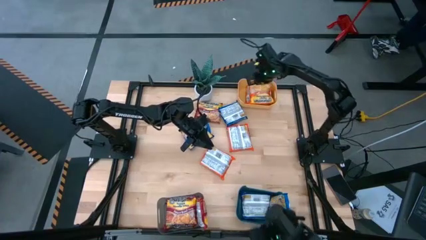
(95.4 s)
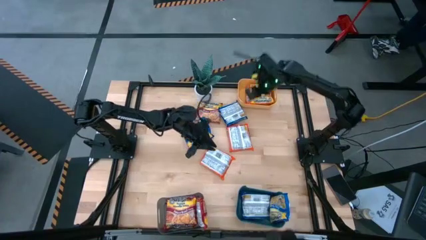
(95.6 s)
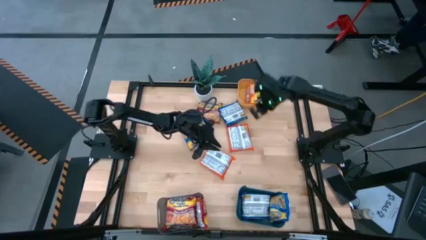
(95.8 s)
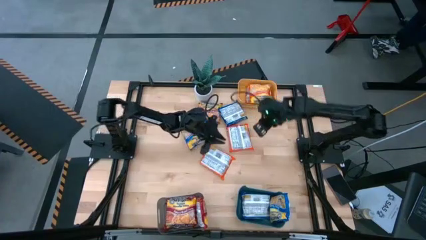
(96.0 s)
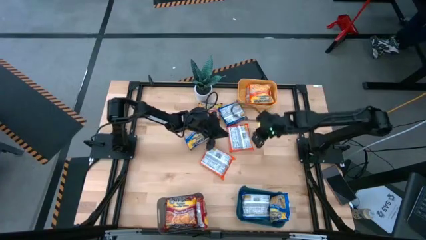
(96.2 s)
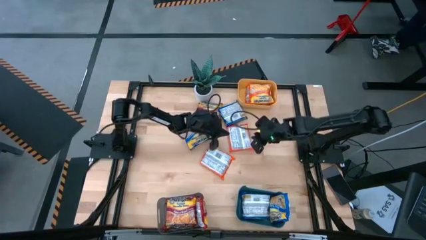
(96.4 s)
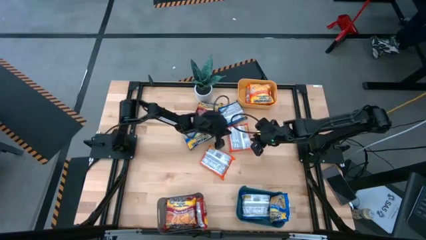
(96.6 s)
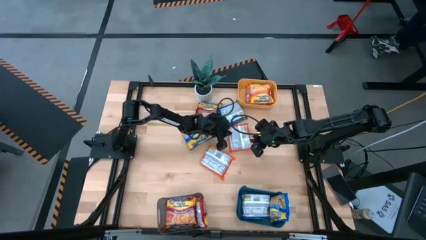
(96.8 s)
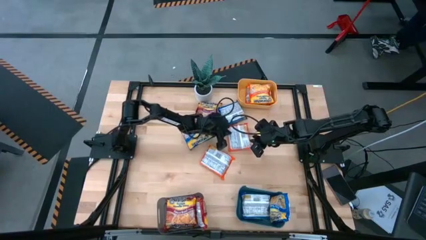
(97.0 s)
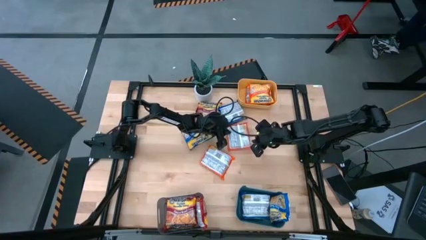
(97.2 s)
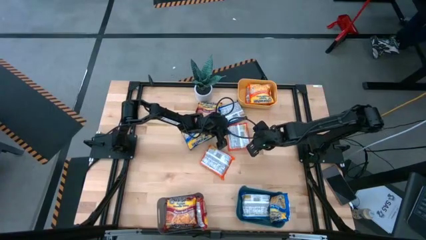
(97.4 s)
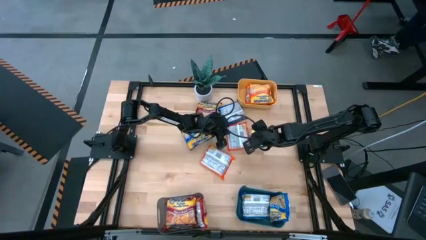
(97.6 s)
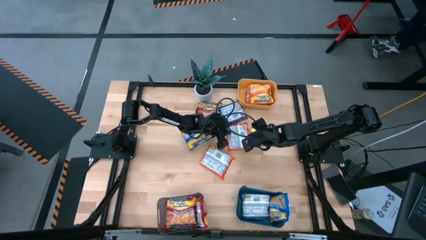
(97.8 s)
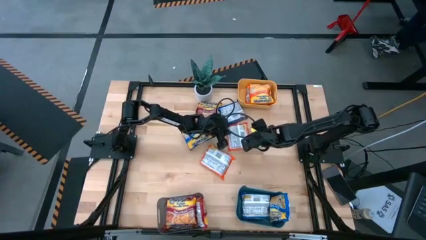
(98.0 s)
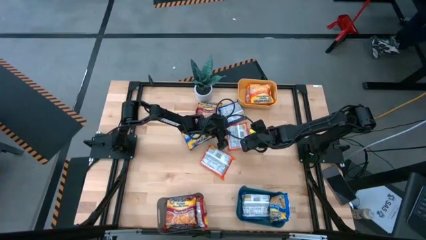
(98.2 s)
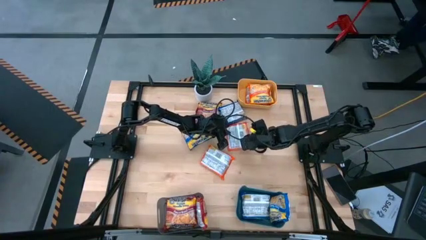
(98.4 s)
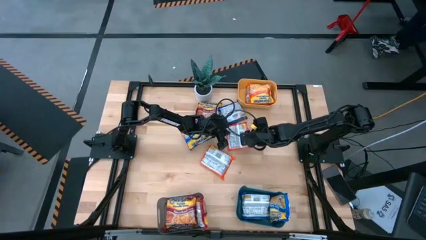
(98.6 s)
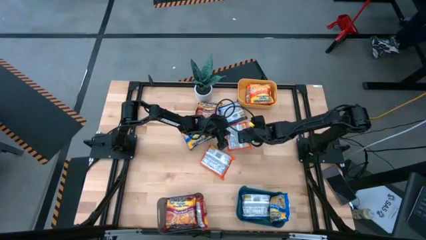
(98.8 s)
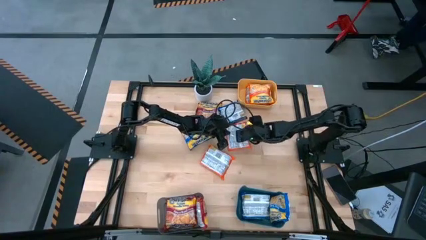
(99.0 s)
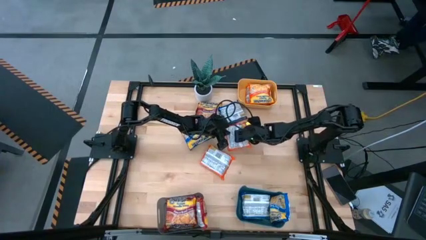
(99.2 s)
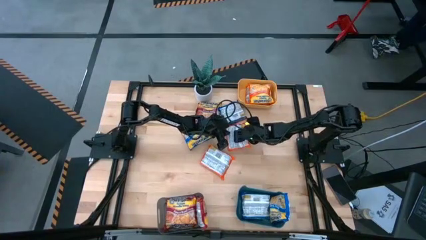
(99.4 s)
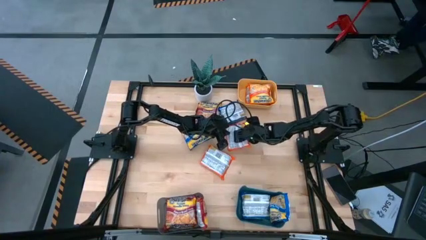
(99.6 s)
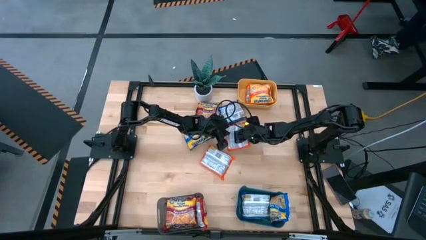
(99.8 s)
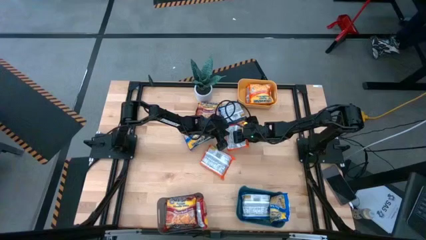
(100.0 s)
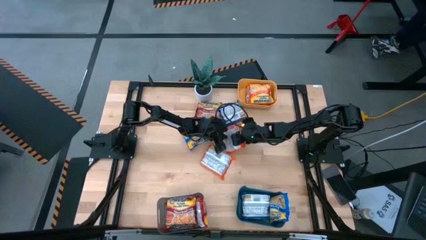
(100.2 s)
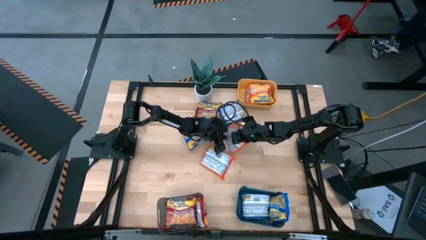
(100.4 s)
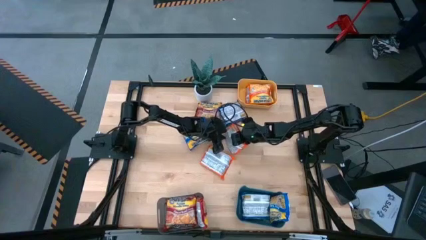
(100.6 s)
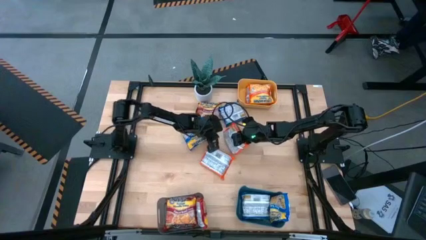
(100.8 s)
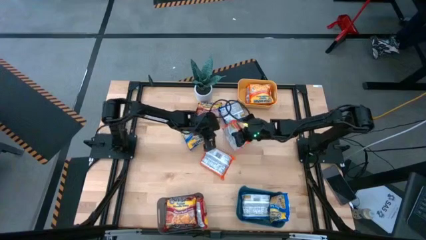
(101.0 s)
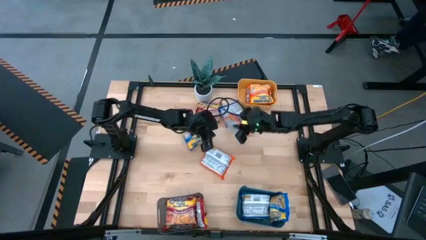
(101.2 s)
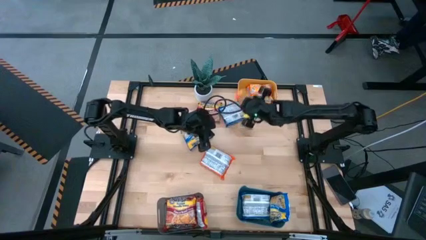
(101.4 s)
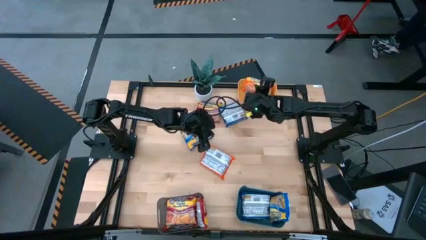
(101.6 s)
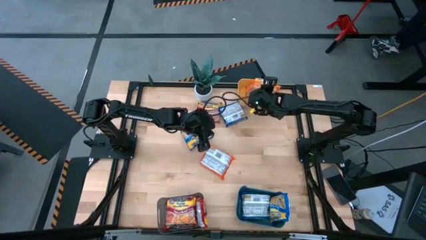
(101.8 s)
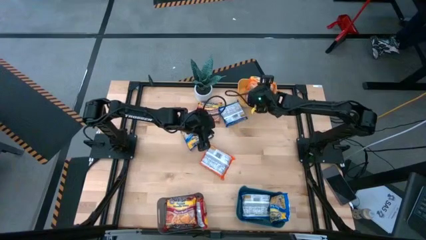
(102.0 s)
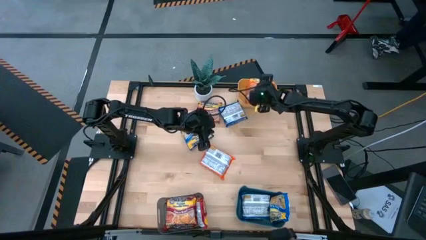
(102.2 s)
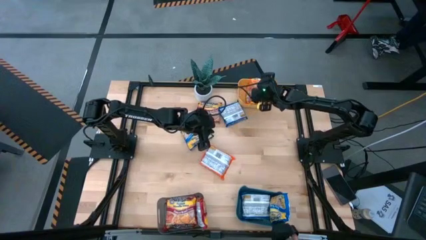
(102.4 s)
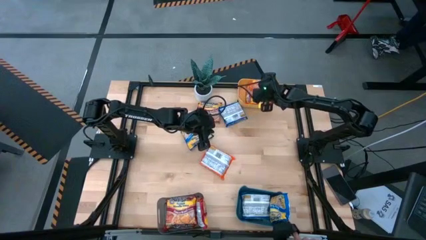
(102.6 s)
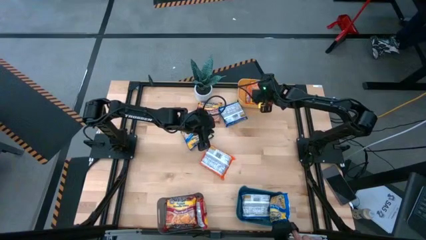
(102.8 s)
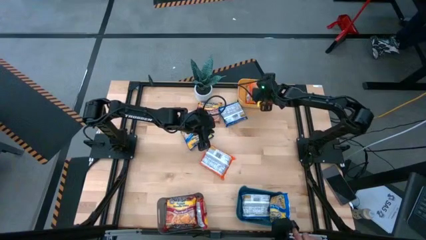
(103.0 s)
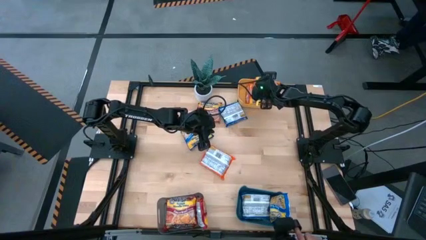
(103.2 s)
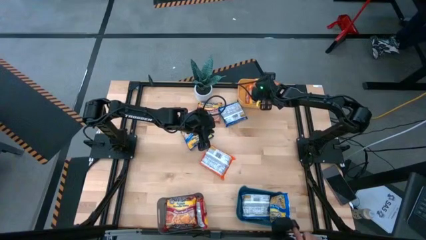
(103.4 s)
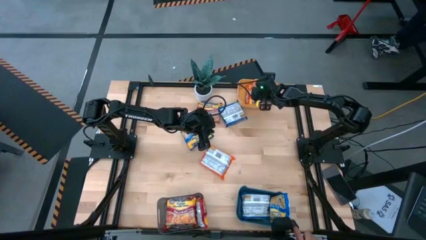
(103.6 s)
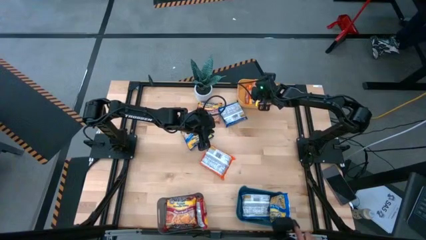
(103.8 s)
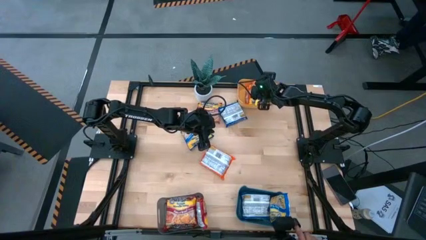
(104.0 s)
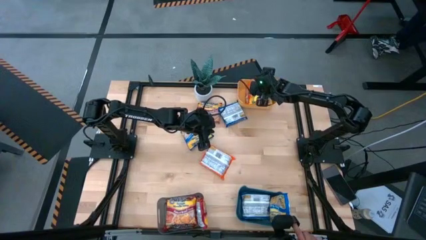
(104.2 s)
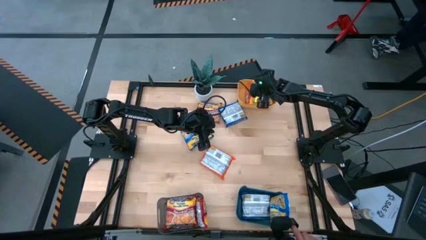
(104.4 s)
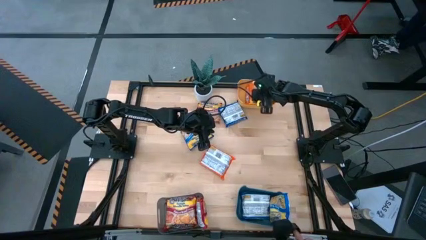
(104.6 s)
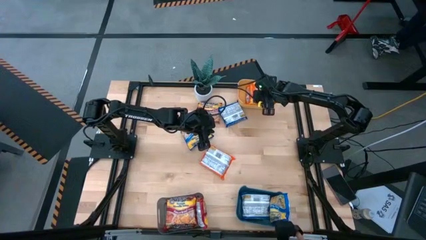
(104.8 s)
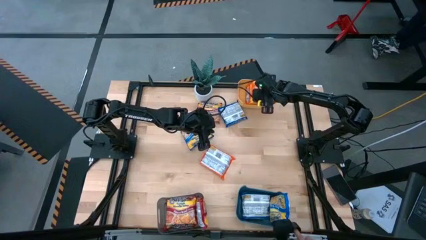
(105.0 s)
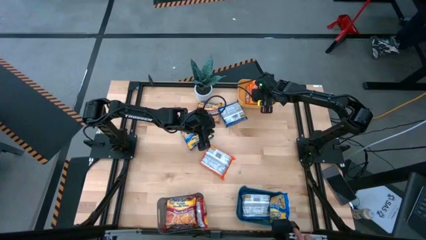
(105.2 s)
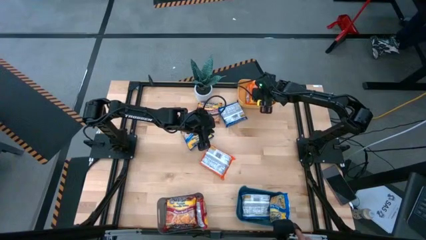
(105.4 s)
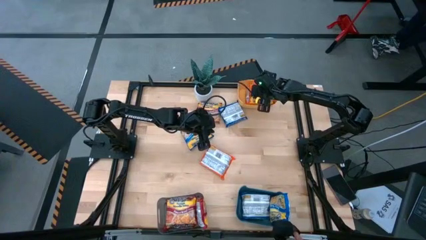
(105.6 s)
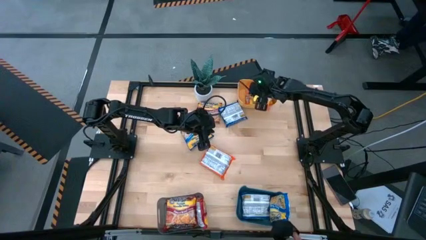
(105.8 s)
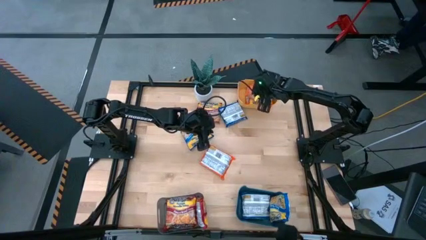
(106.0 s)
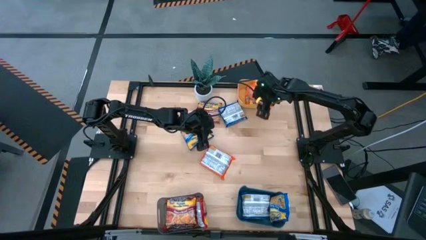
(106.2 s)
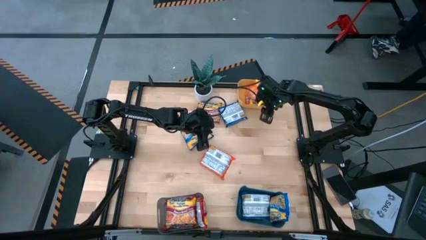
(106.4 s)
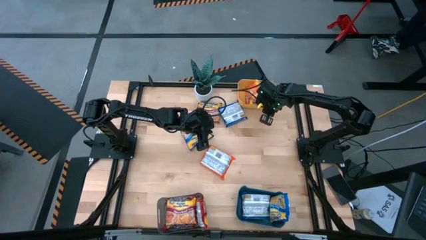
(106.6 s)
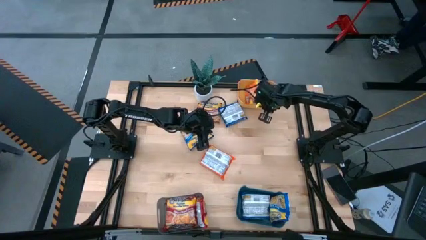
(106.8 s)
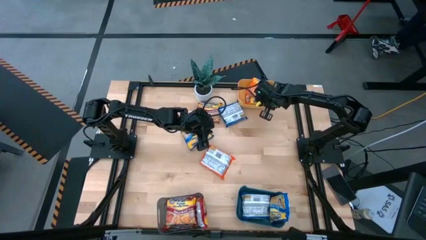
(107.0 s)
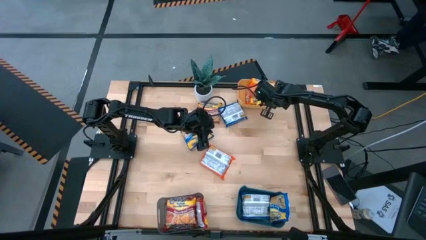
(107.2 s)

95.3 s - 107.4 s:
Task: Sort Maruchan noodles
Put the orange noodle pack into the yellow bin
